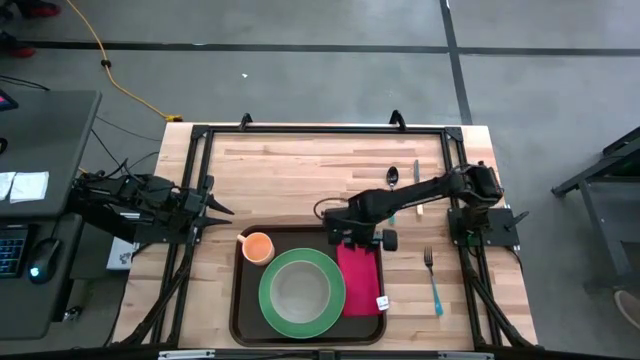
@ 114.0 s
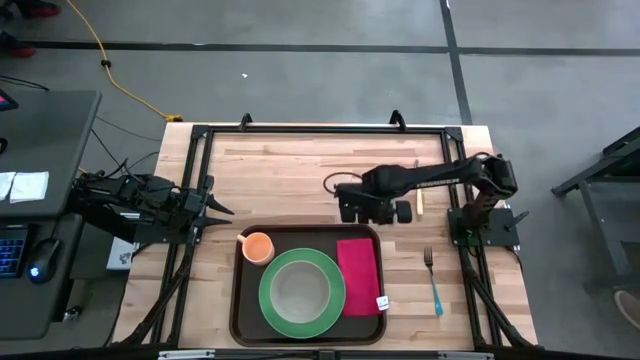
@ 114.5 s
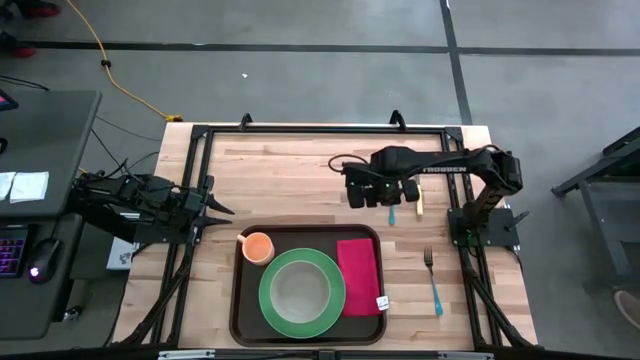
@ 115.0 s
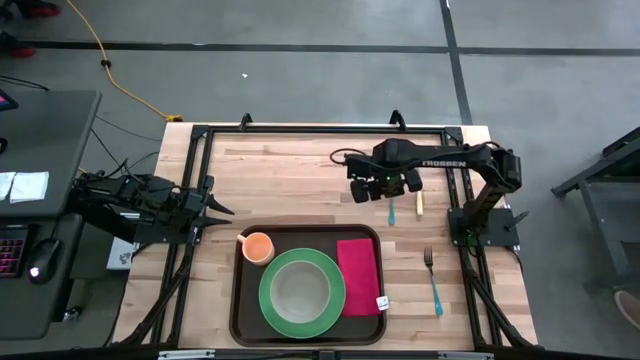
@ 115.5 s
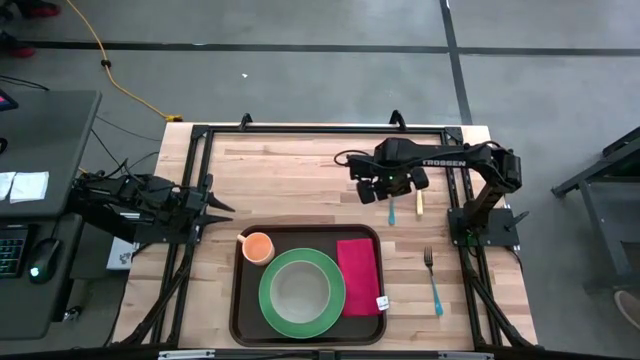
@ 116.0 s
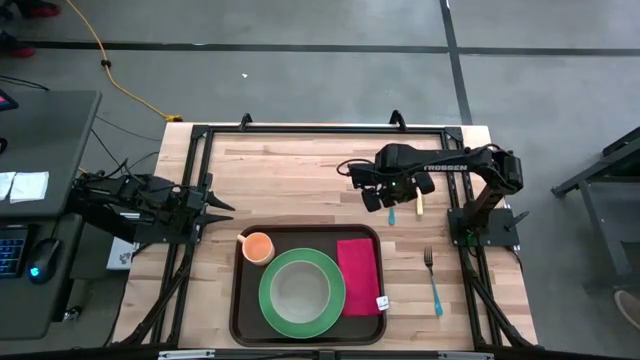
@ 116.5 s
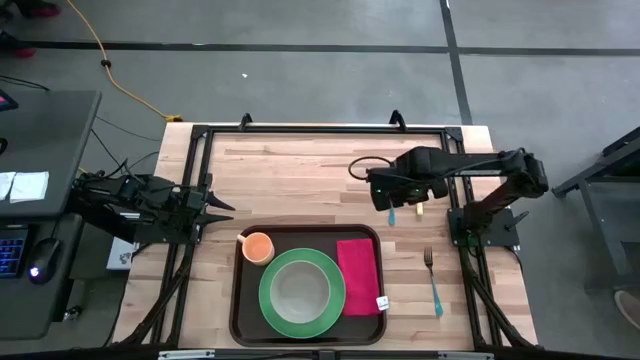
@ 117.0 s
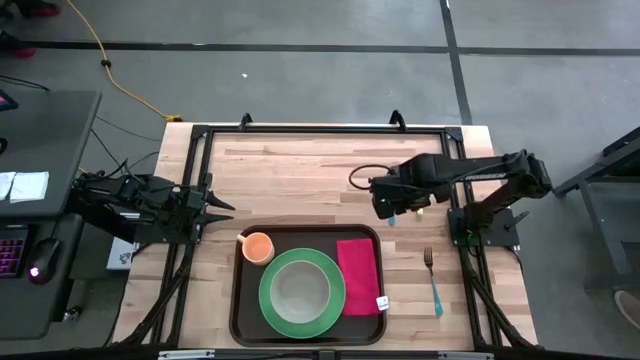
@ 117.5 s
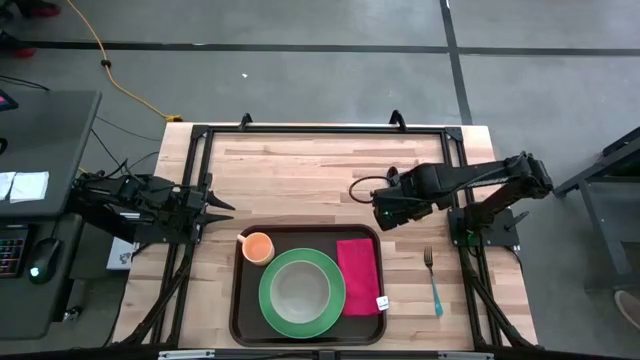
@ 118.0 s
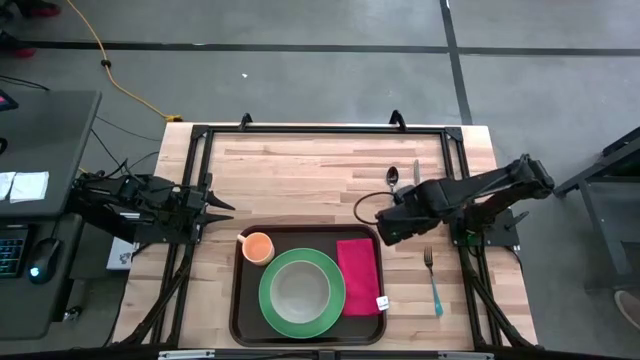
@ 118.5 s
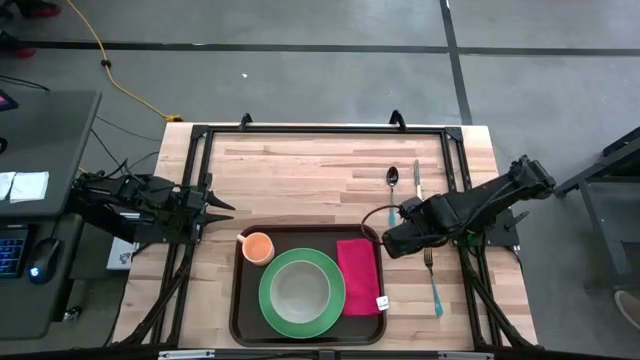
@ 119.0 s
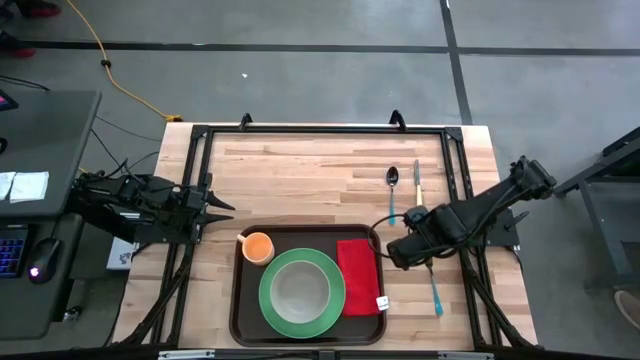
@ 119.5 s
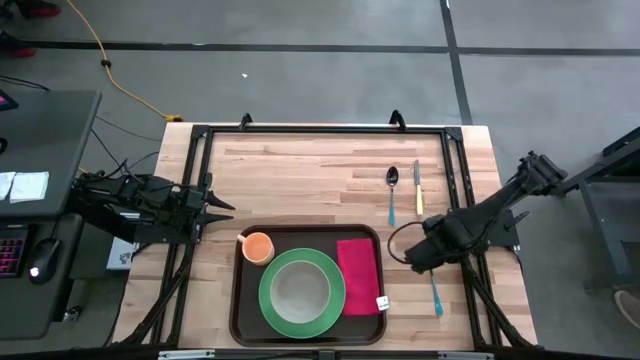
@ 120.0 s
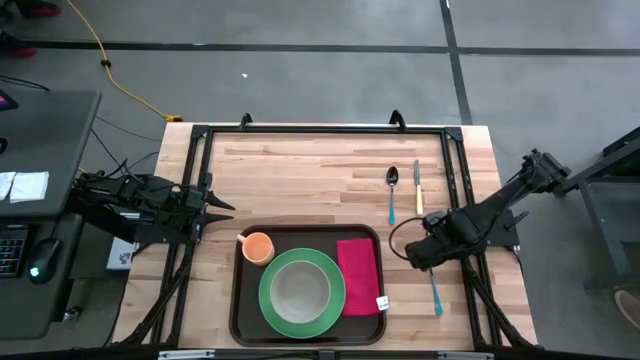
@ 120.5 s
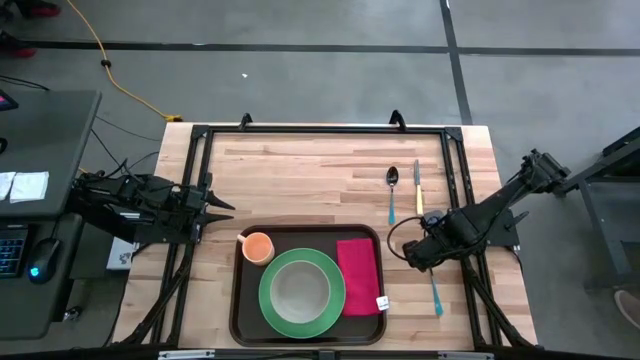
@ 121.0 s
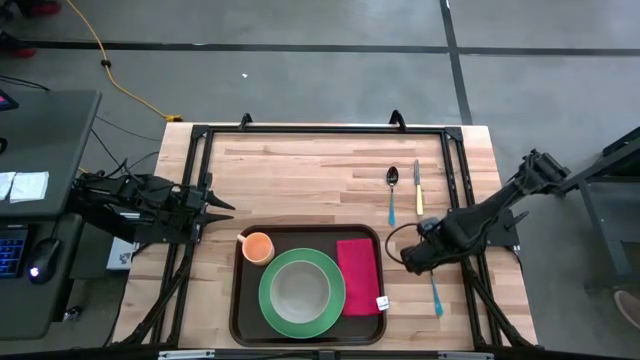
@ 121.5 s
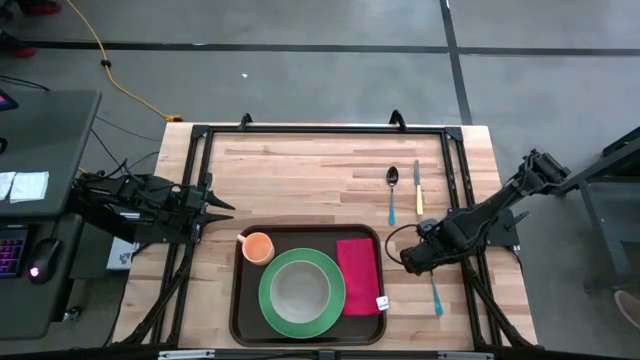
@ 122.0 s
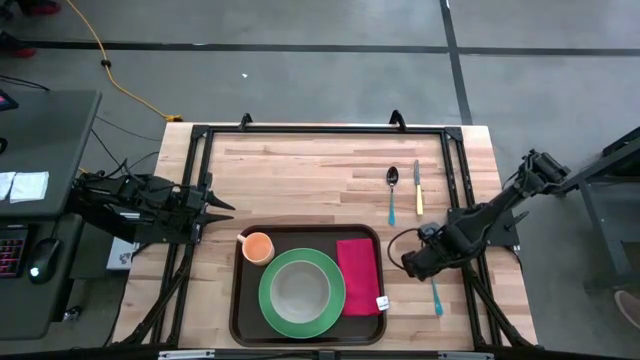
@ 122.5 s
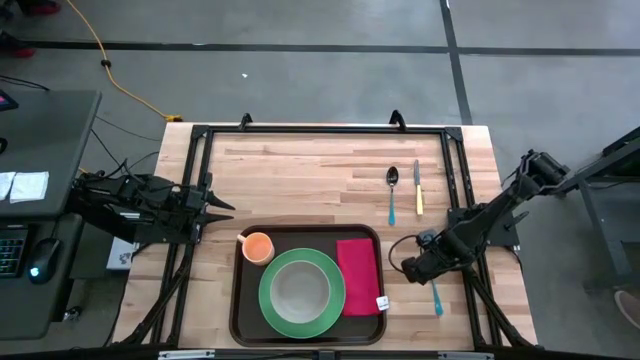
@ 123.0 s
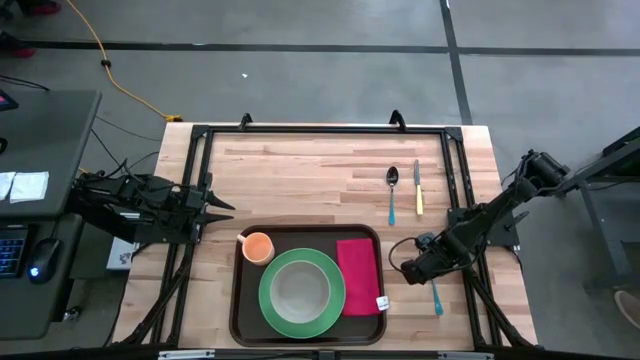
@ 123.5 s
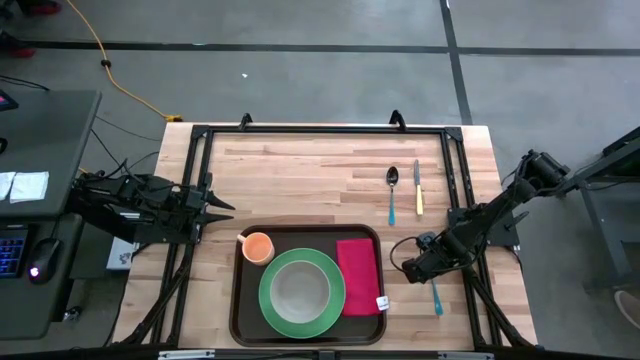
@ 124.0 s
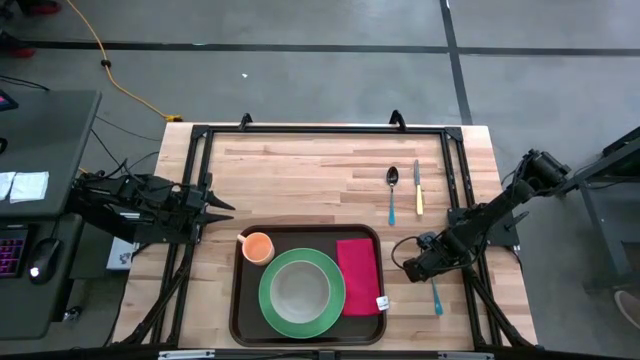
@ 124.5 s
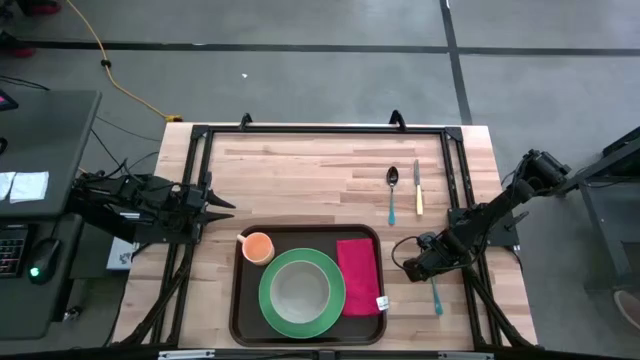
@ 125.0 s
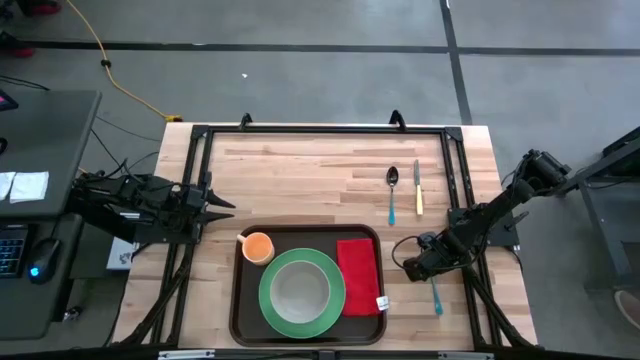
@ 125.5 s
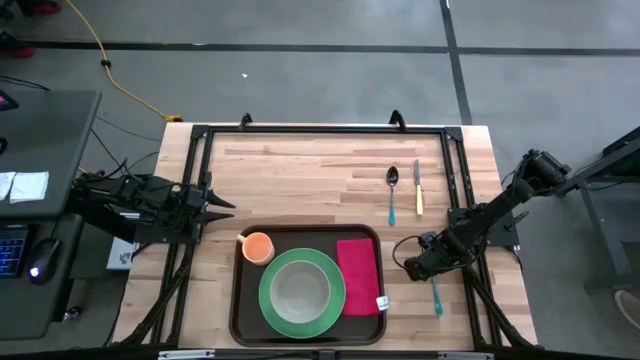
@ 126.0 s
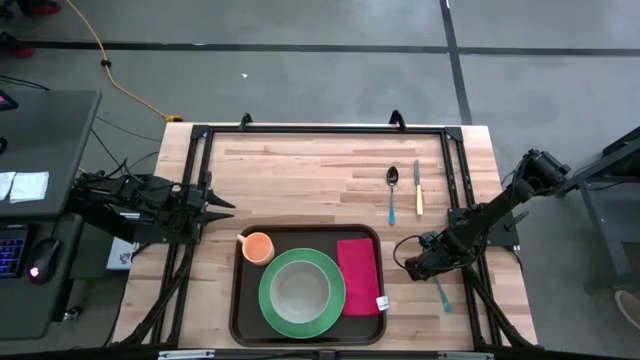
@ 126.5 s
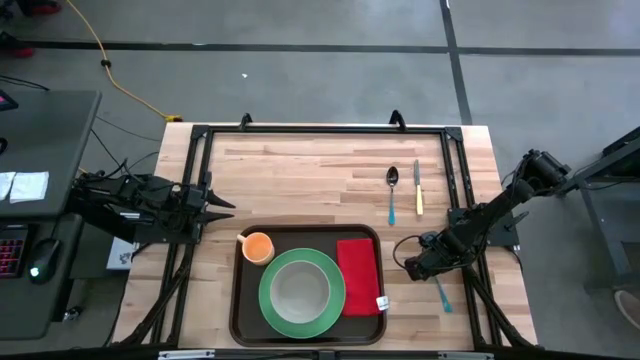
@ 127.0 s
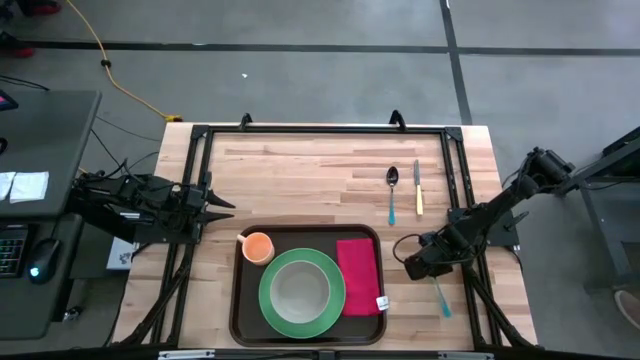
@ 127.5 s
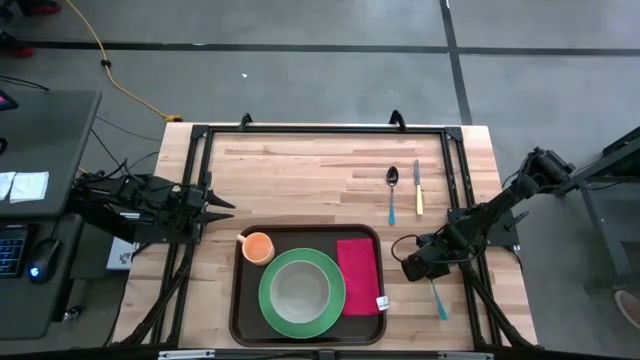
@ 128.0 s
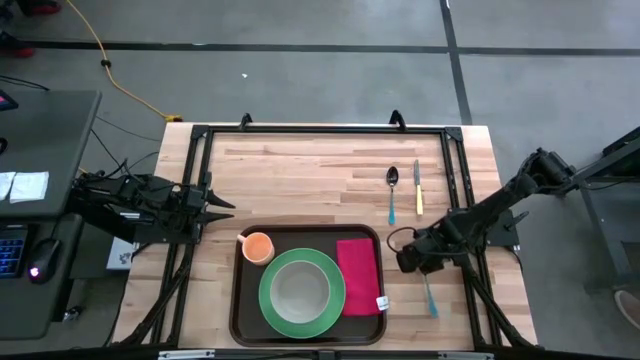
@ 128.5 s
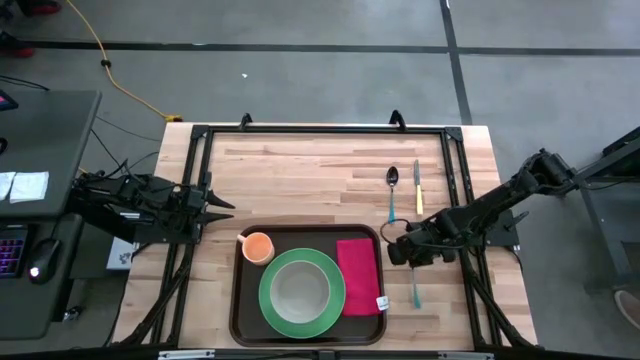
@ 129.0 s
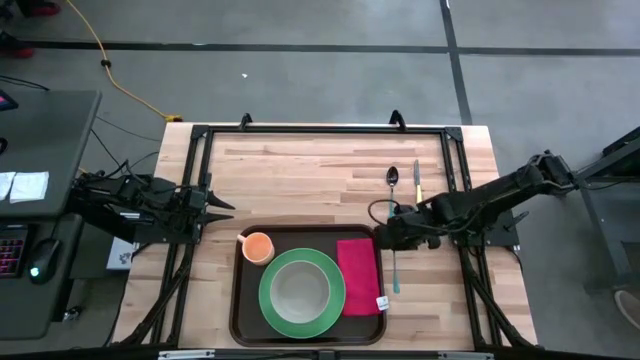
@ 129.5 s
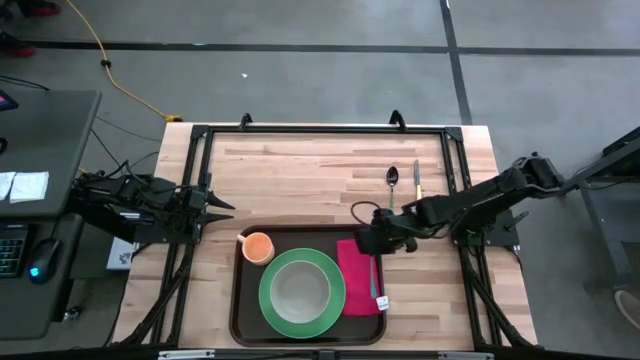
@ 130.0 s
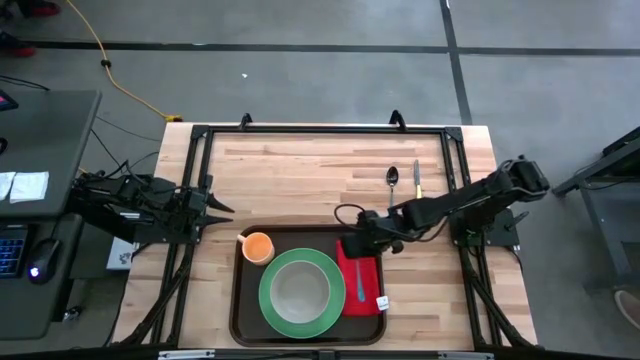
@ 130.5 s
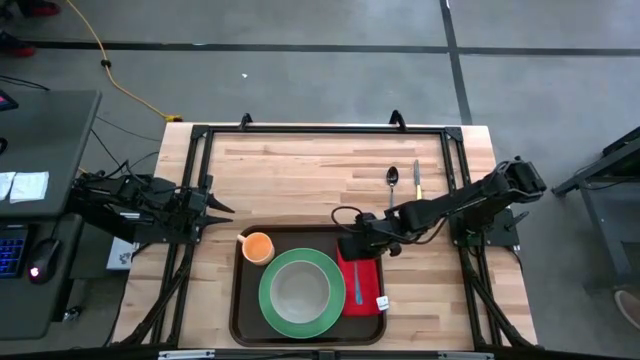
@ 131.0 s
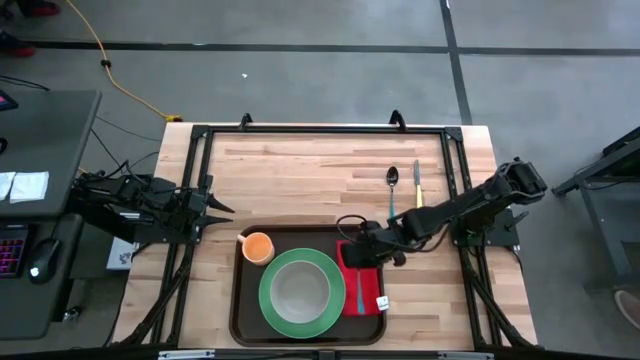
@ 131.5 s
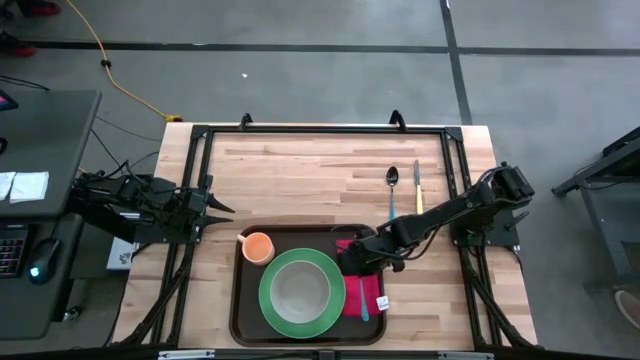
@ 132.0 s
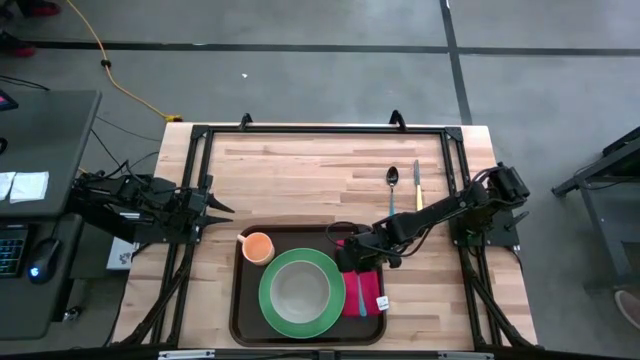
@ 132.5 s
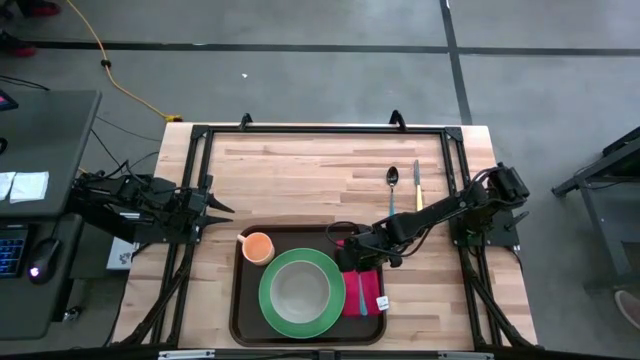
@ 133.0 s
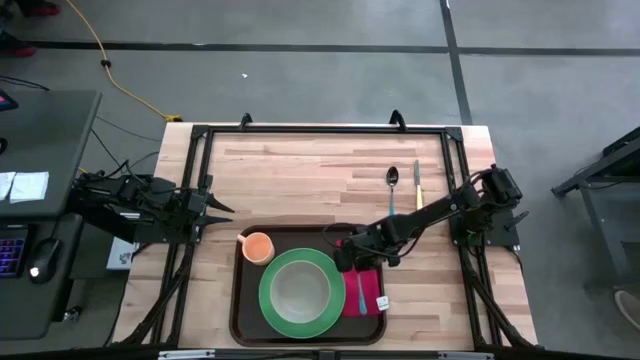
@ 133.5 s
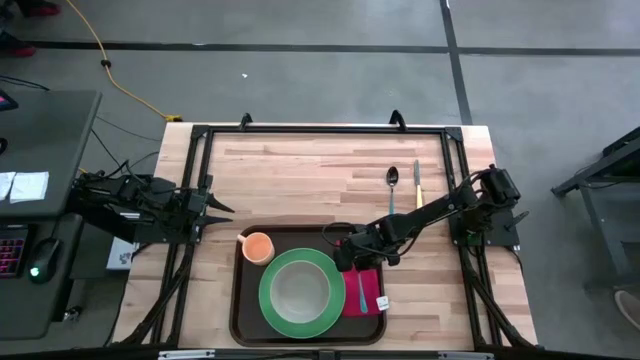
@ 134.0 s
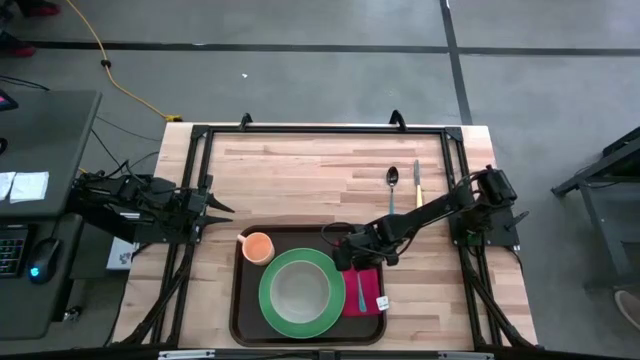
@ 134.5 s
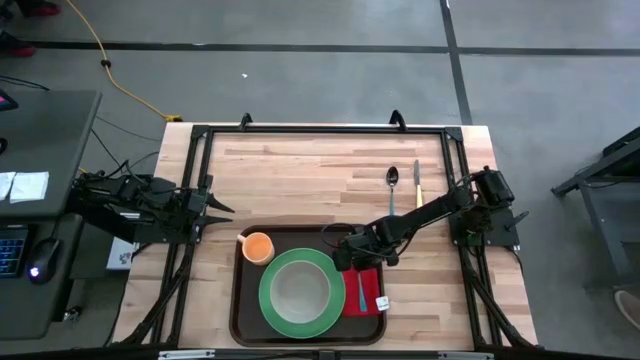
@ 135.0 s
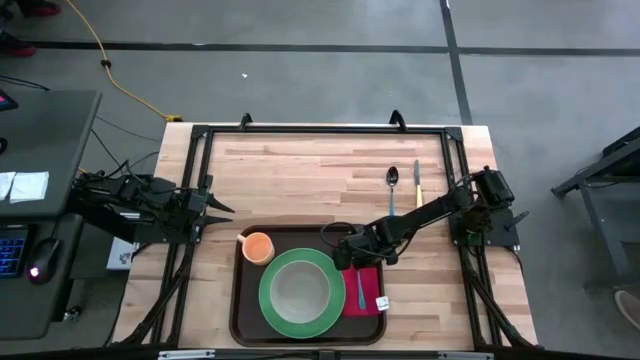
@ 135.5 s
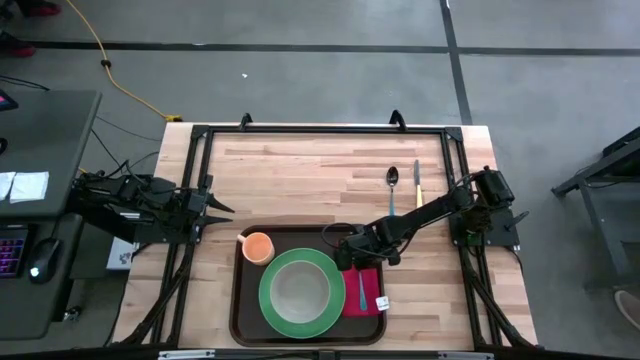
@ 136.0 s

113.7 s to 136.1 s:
Task: Set up tray
Put the blue fork on the red napkin
